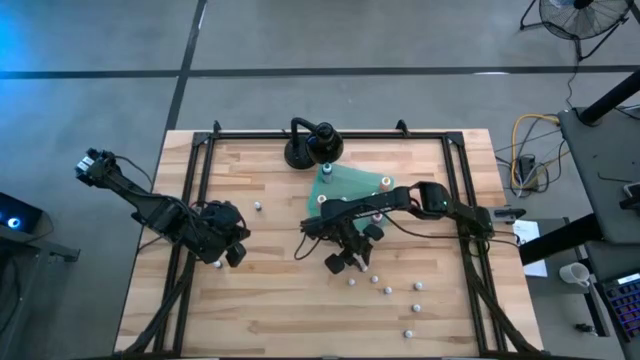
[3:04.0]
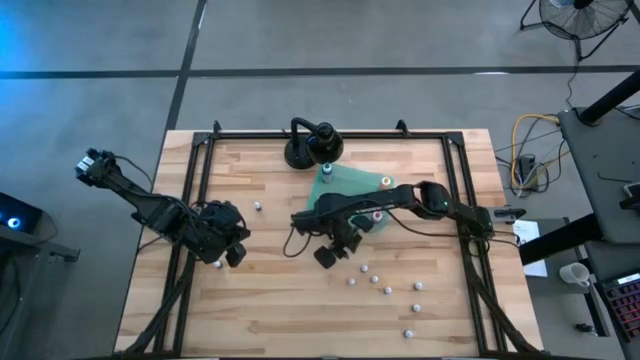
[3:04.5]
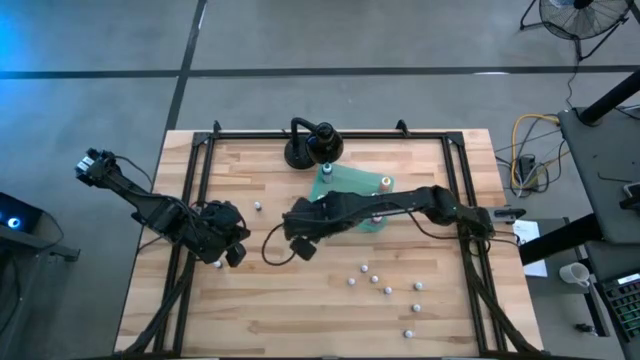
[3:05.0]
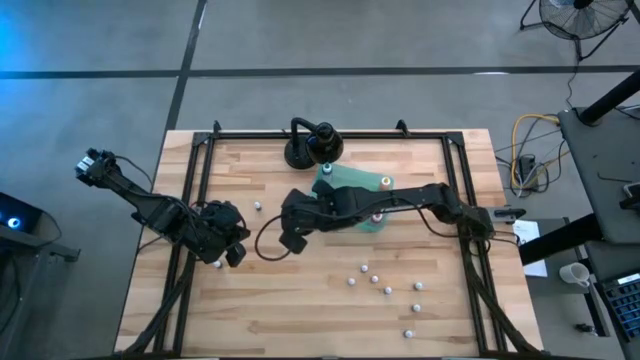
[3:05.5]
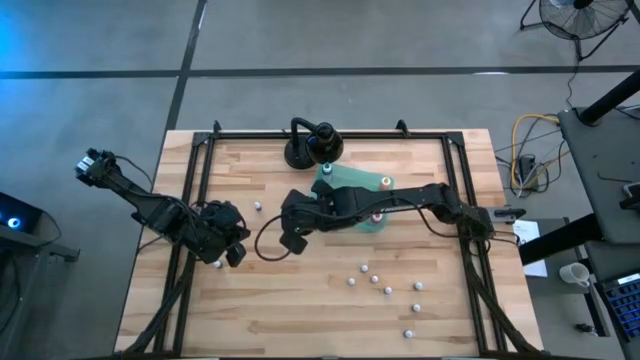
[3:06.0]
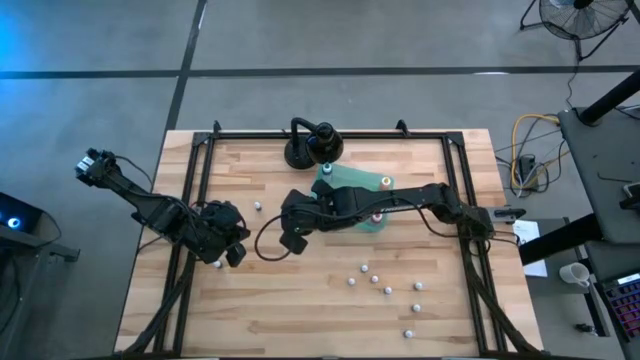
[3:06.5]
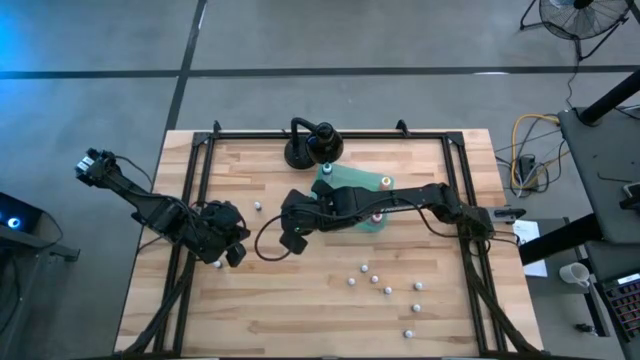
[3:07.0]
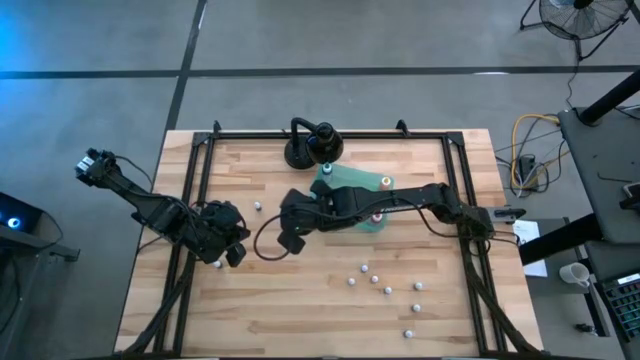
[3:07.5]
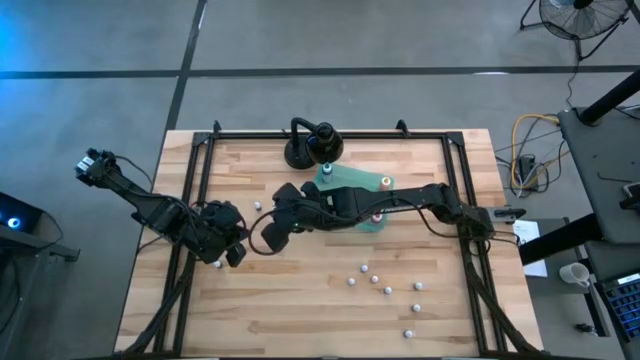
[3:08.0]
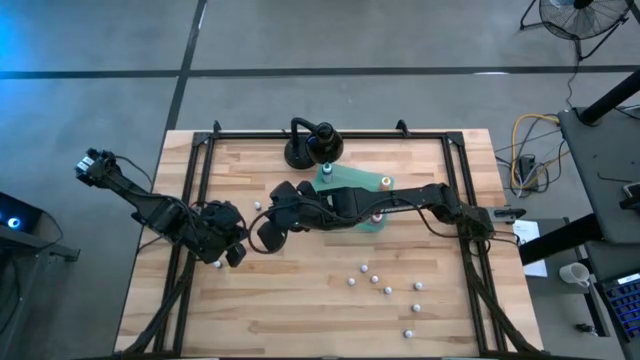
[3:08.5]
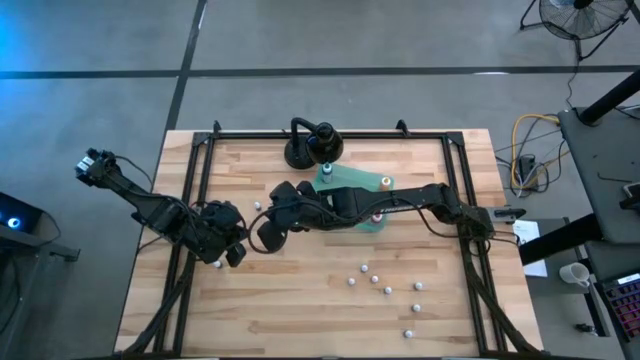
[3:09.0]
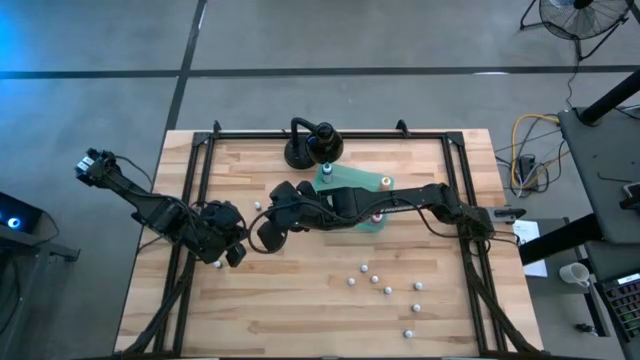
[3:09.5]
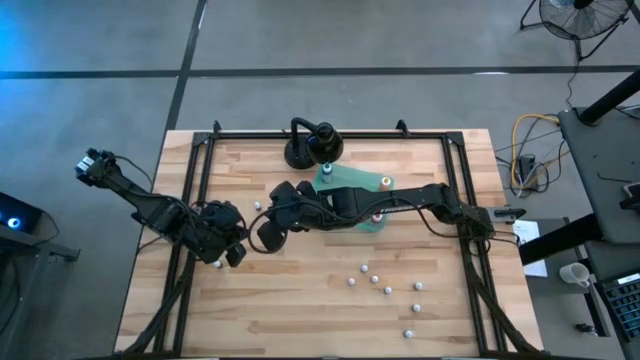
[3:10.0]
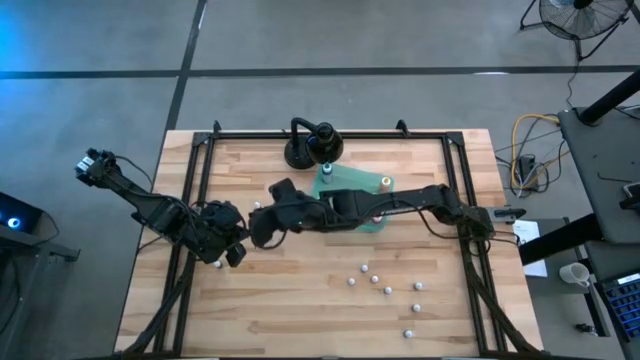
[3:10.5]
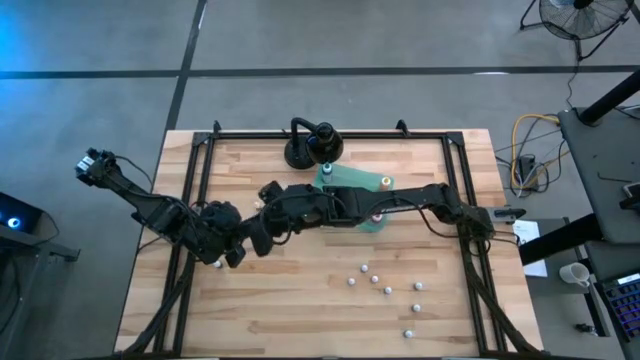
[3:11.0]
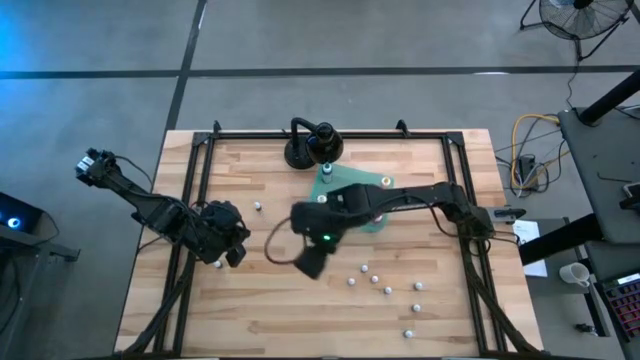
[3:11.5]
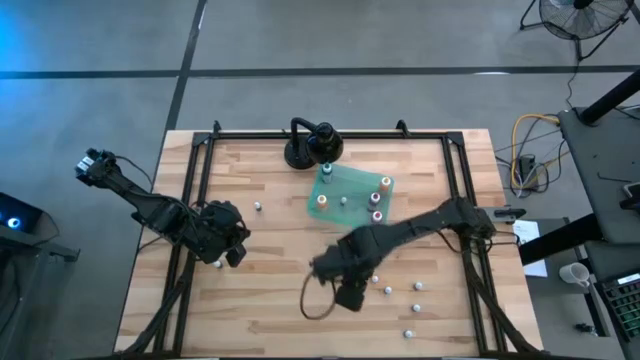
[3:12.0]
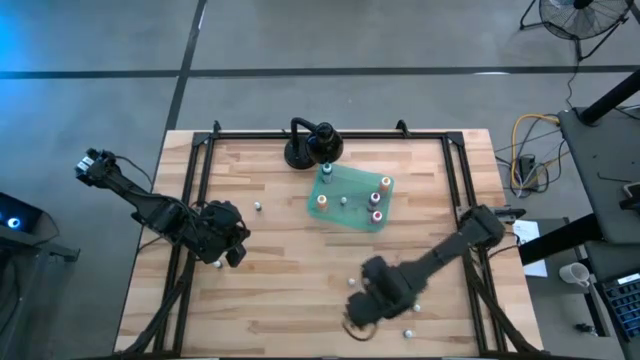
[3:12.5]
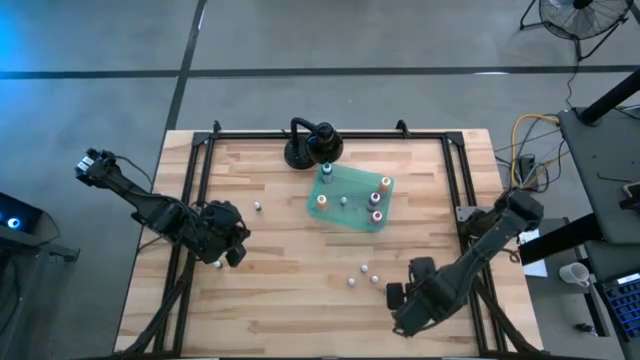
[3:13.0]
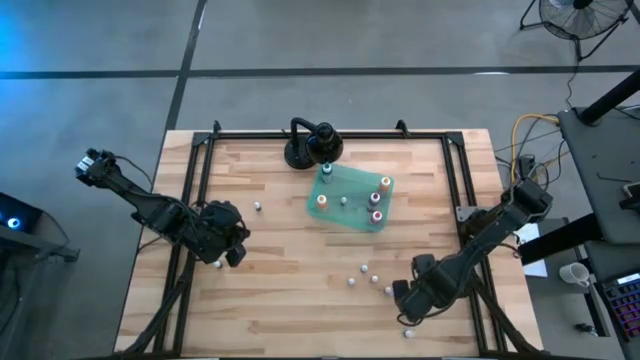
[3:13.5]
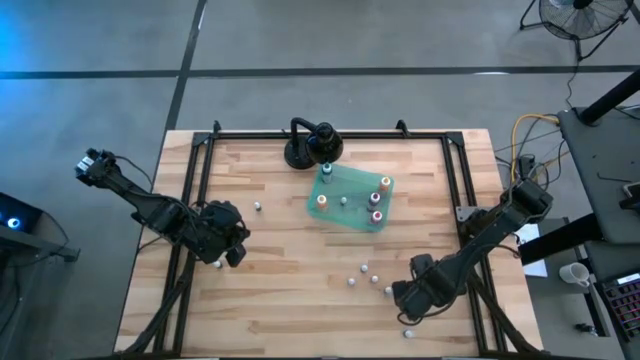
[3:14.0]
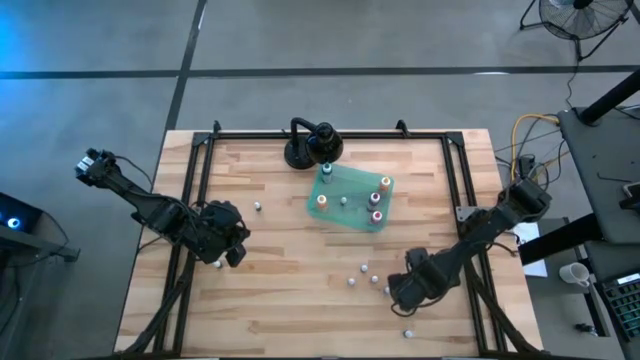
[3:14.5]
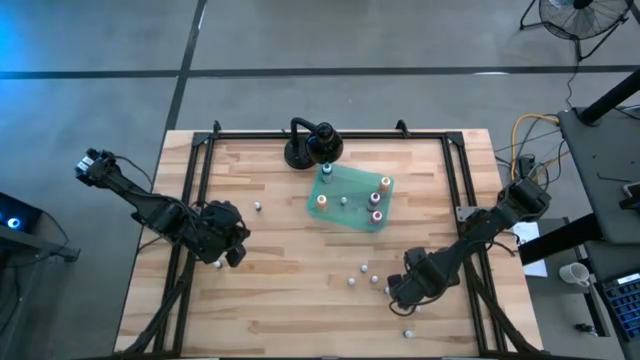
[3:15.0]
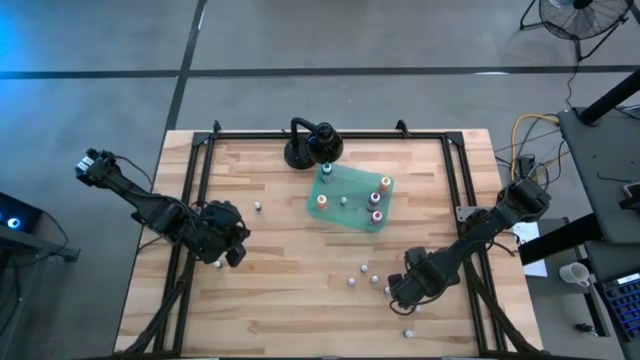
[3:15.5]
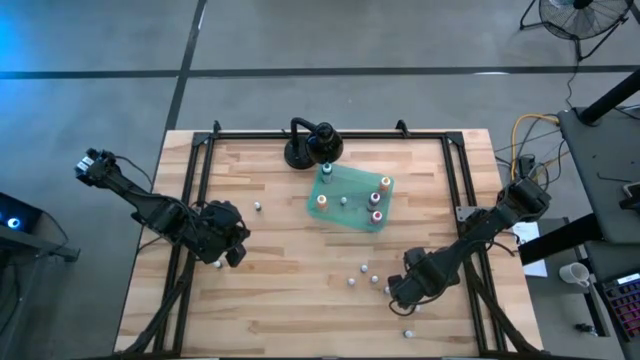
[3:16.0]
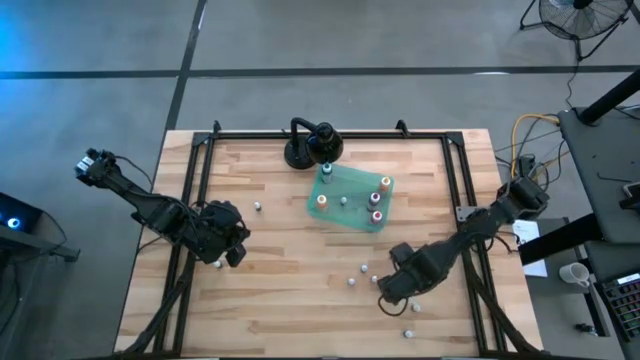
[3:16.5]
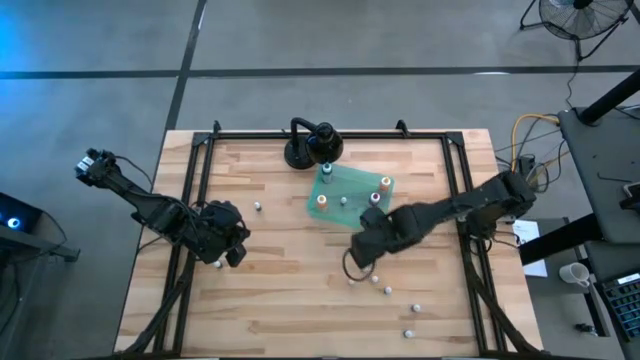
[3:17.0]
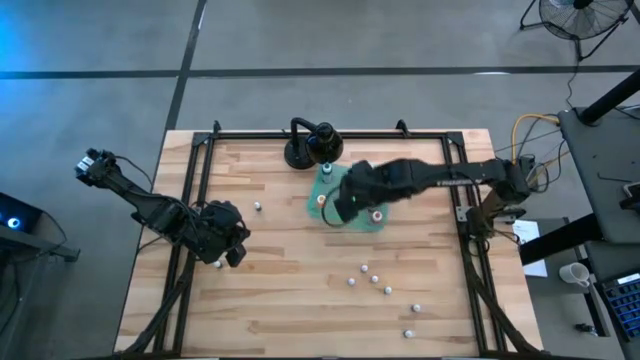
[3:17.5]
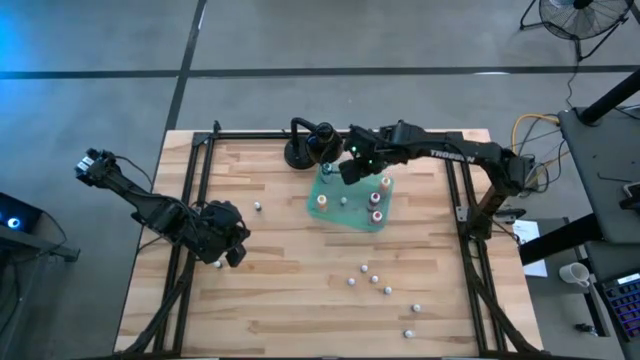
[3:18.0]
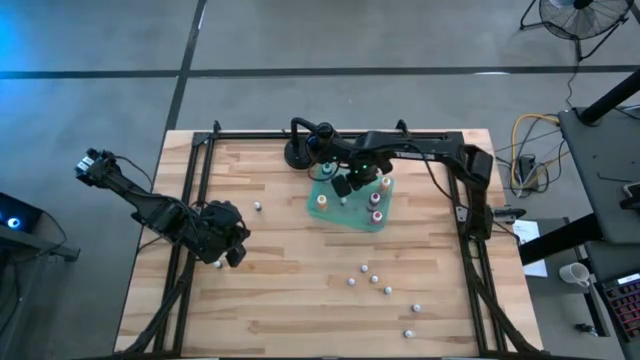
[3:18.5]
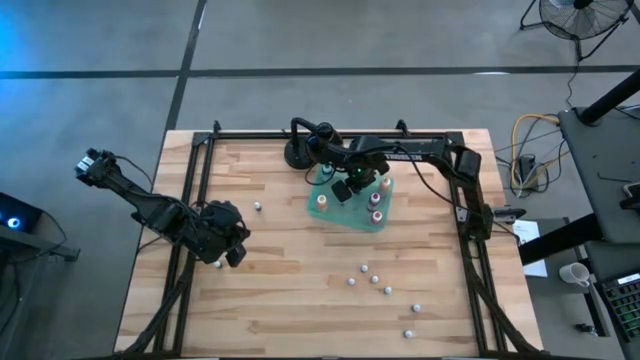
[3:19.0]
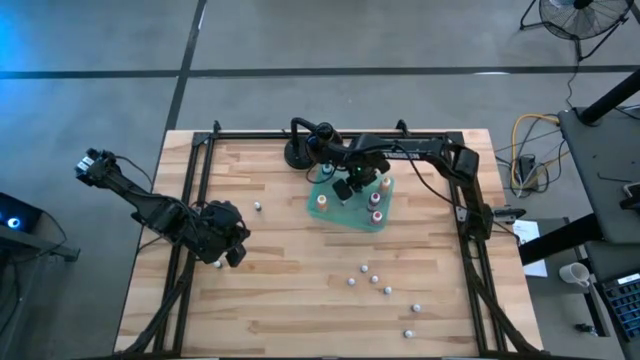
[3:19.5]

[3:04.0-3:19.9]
Task: Pick & Place food coloring
Put the green food coloring bottle into the green bin

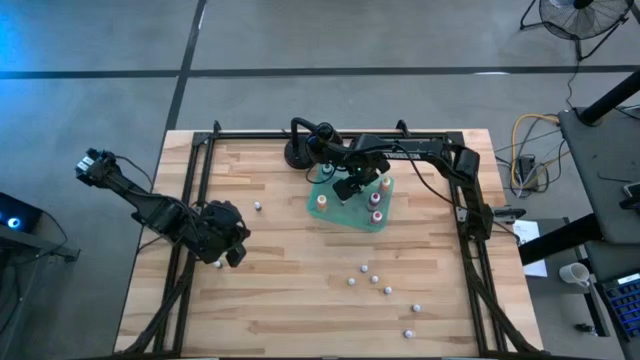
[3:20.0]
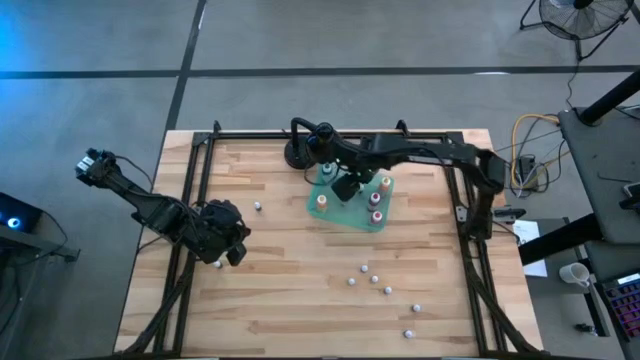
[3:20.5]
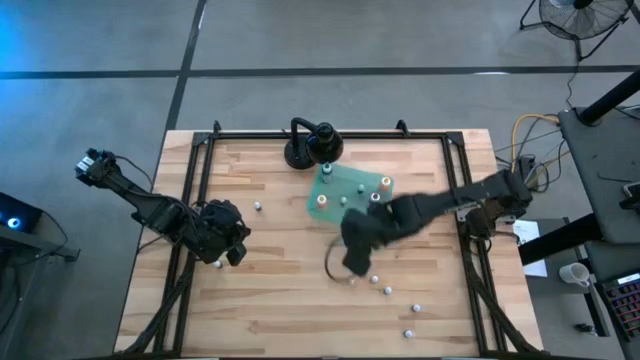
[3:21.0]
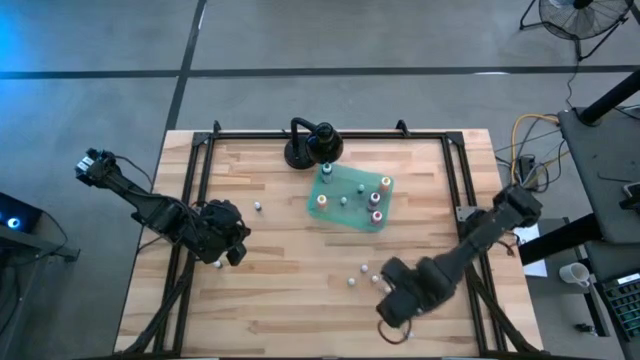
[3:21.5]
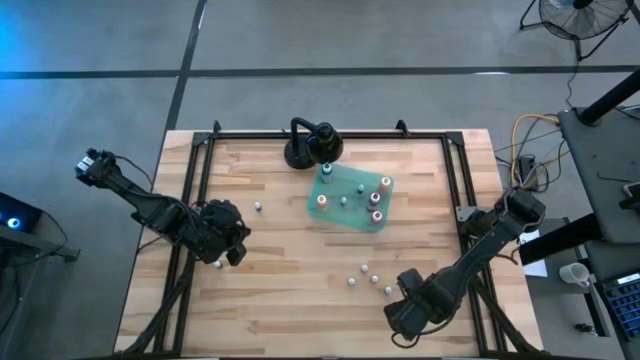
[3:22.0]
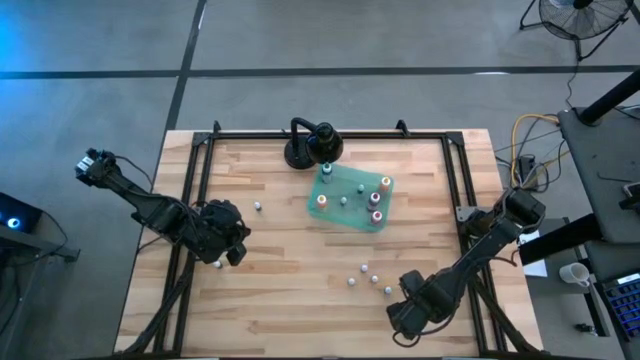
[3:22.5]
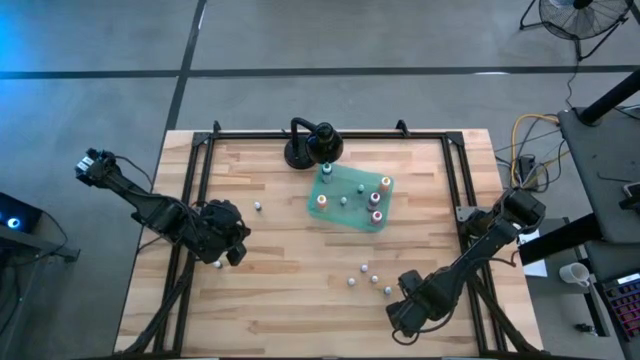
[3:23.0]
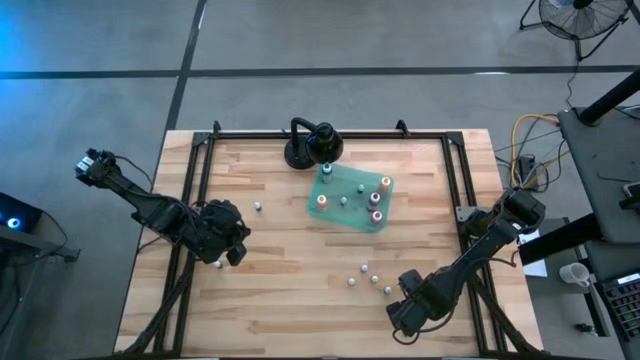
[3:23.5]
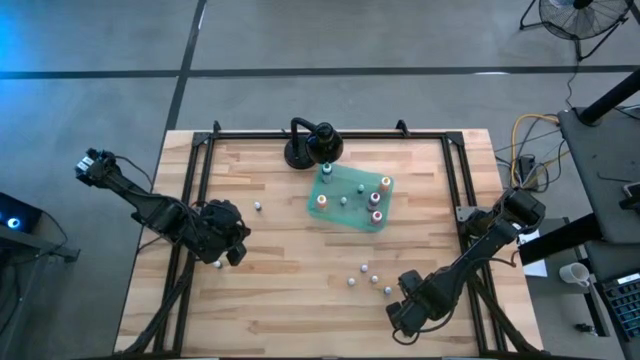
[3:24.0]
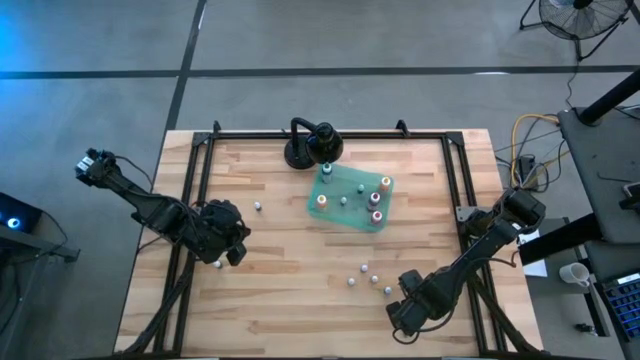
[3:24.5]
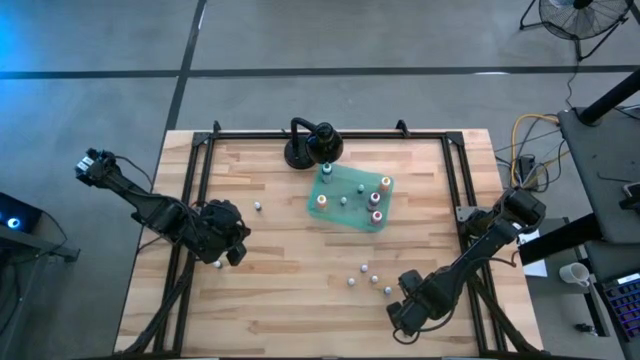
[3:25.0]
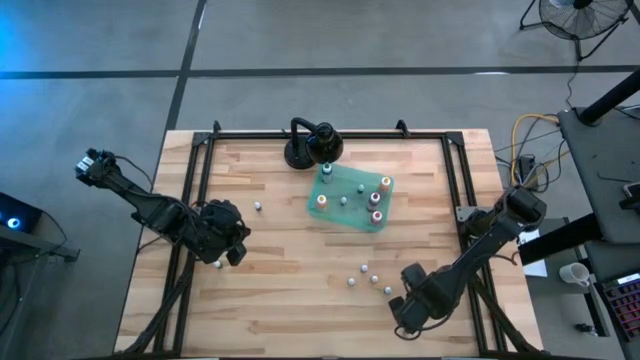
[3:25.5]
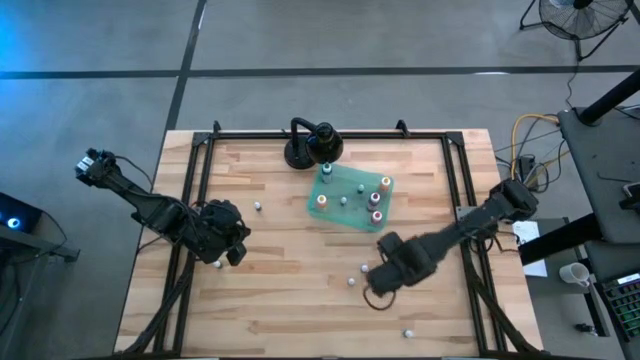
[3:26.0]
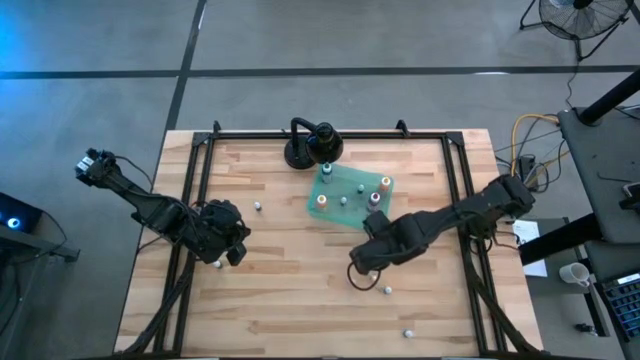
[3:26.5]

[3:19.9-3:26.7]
Put the pink food coloring bottle into the green bin
